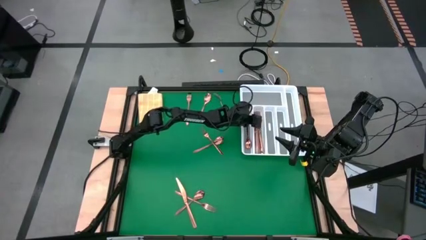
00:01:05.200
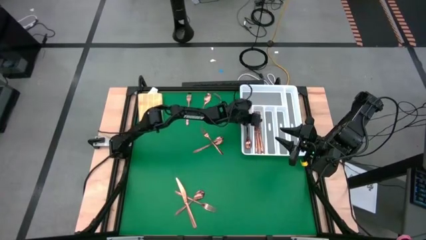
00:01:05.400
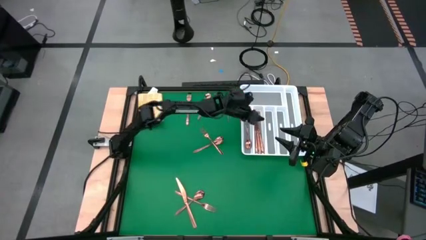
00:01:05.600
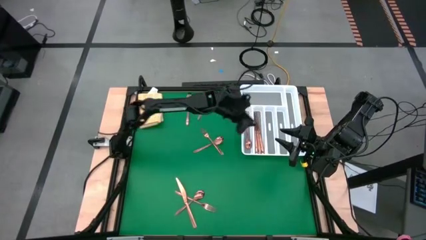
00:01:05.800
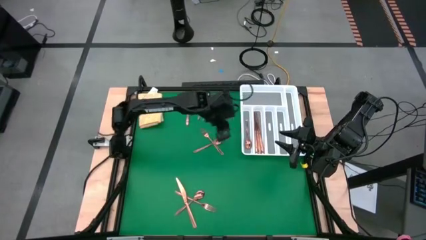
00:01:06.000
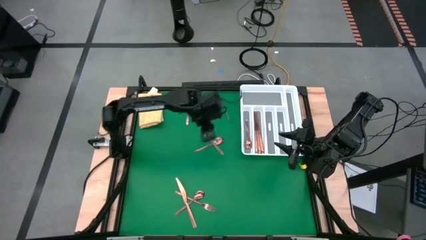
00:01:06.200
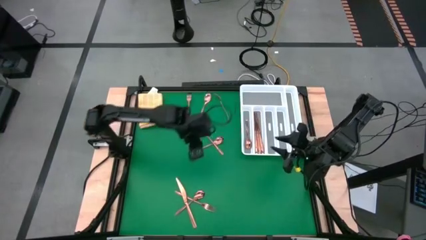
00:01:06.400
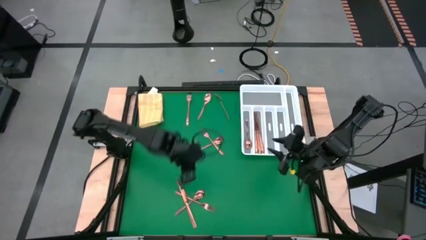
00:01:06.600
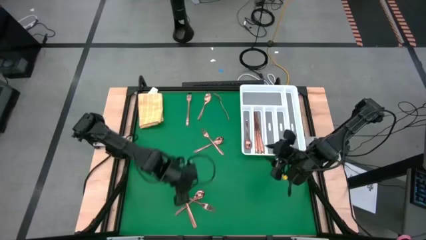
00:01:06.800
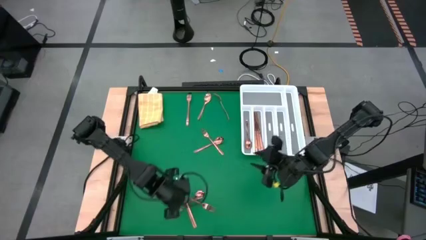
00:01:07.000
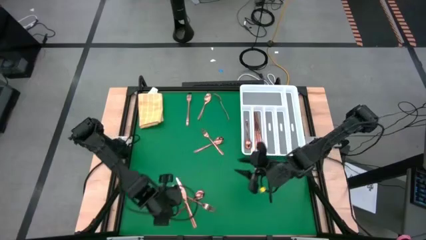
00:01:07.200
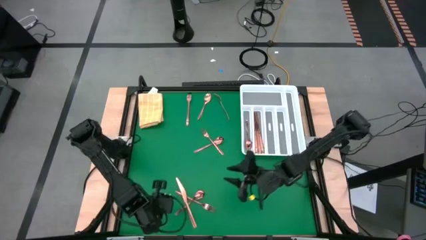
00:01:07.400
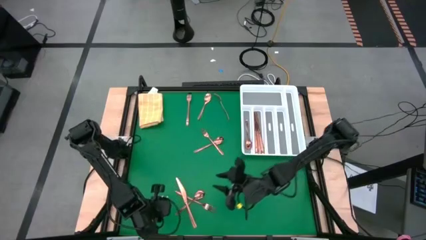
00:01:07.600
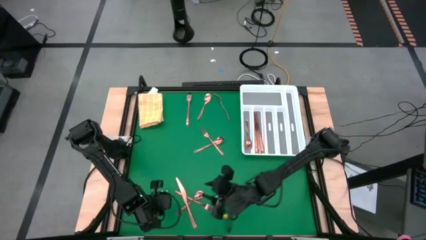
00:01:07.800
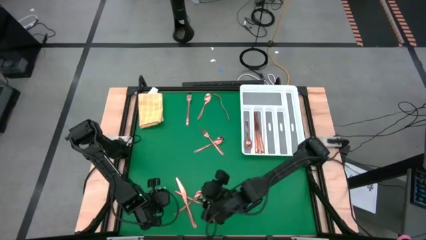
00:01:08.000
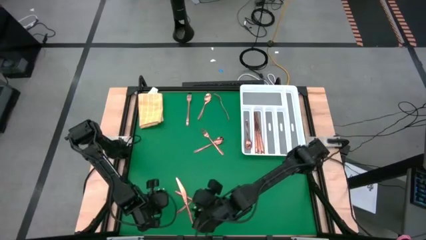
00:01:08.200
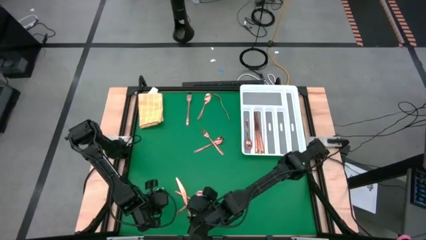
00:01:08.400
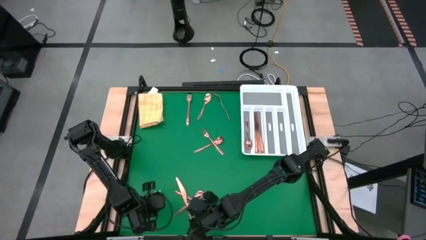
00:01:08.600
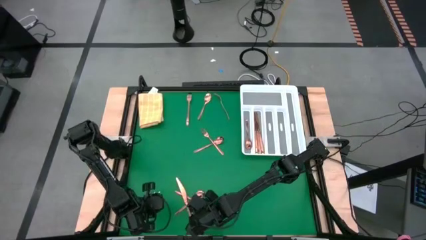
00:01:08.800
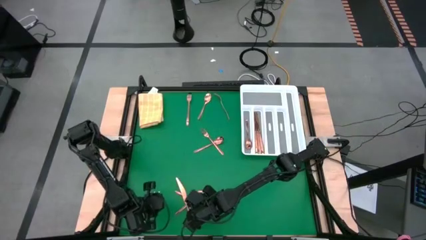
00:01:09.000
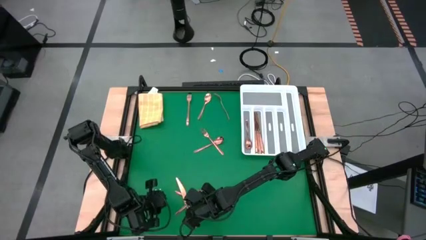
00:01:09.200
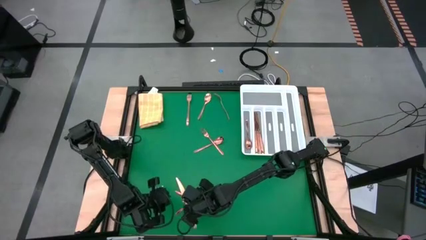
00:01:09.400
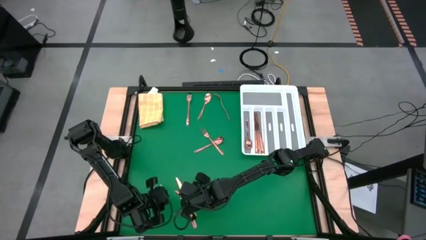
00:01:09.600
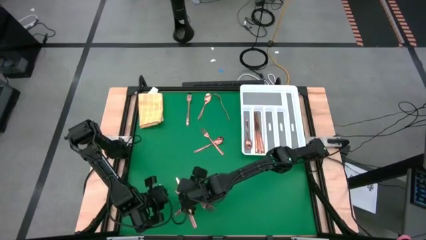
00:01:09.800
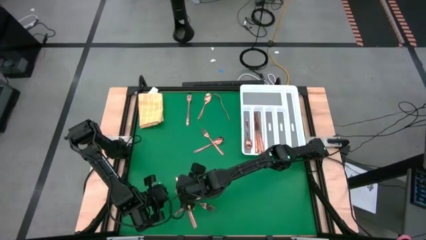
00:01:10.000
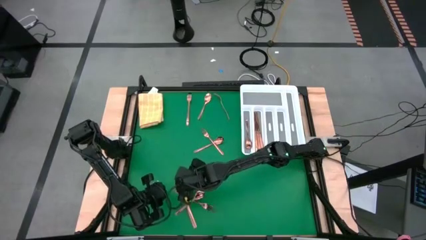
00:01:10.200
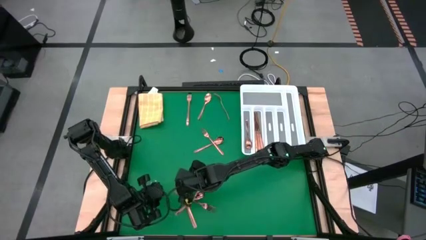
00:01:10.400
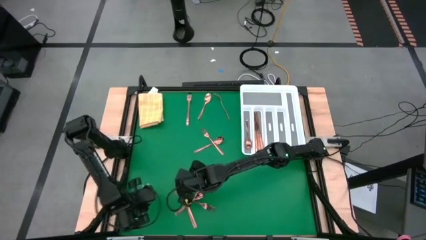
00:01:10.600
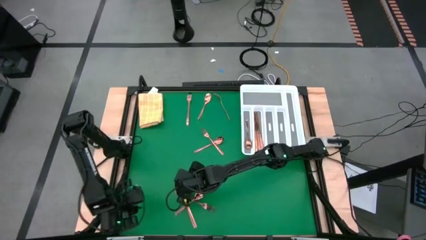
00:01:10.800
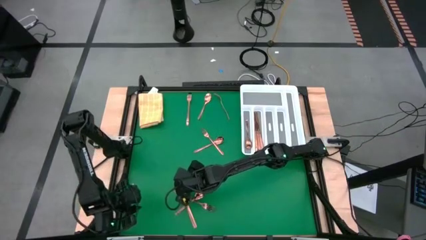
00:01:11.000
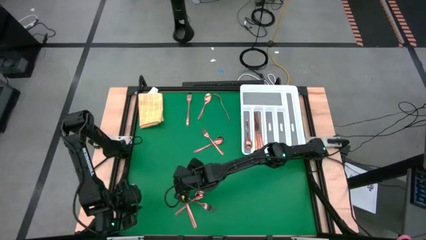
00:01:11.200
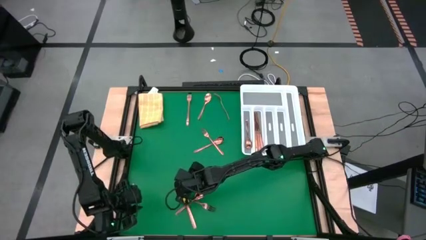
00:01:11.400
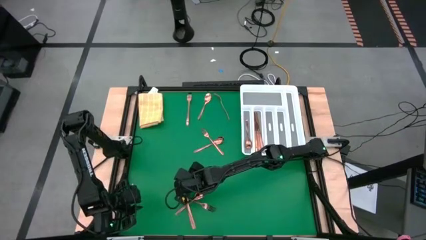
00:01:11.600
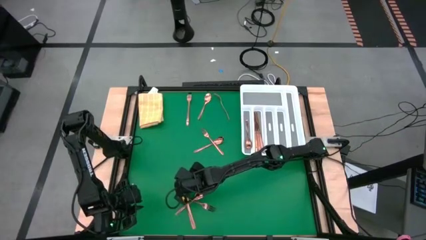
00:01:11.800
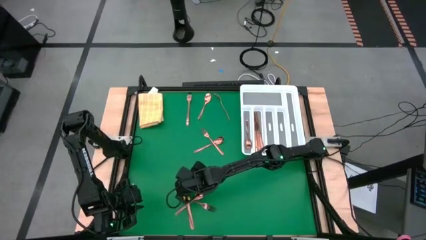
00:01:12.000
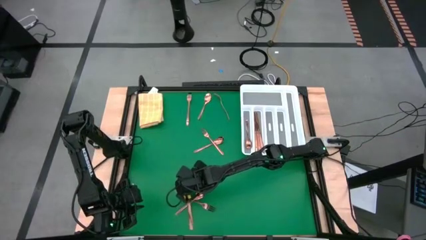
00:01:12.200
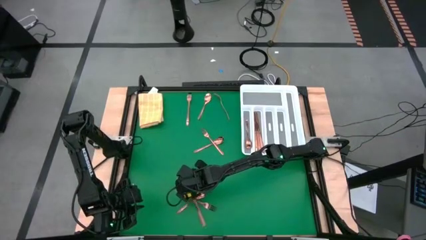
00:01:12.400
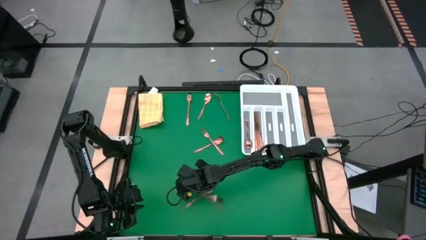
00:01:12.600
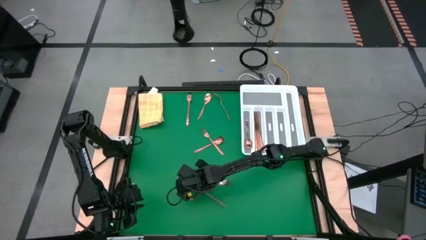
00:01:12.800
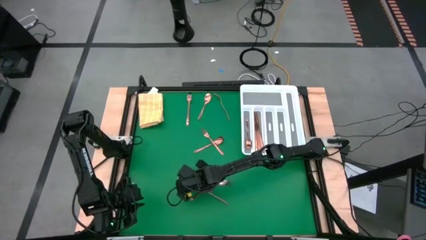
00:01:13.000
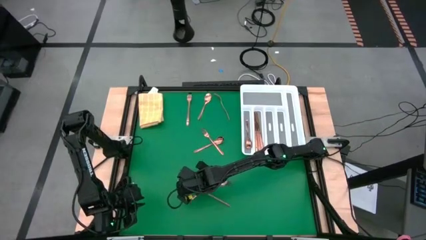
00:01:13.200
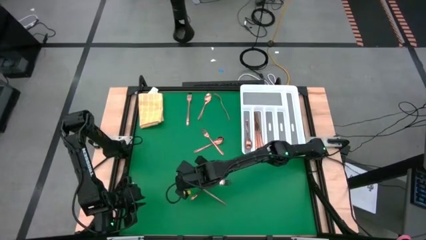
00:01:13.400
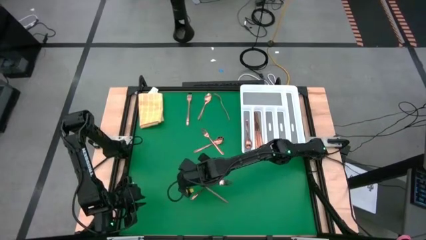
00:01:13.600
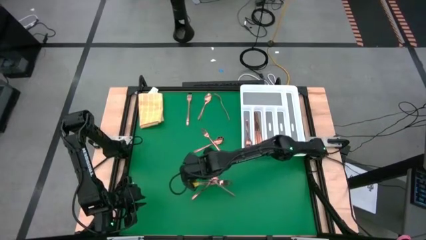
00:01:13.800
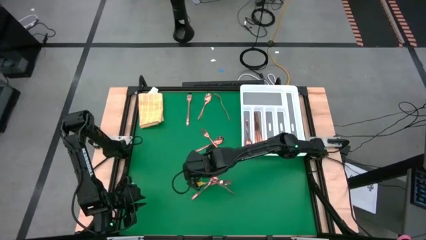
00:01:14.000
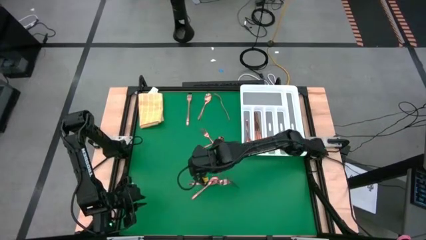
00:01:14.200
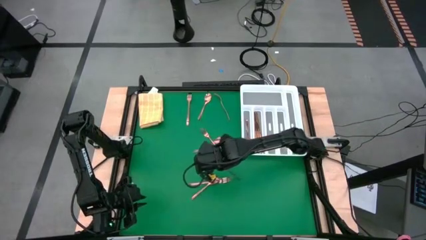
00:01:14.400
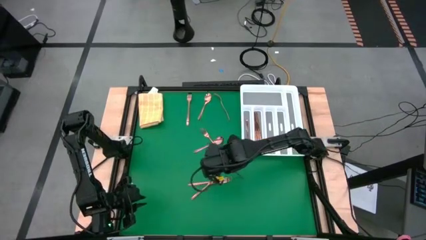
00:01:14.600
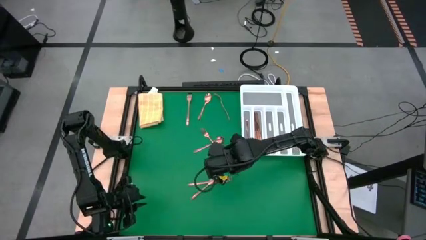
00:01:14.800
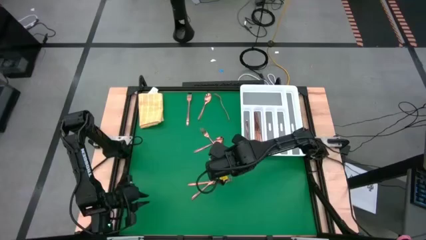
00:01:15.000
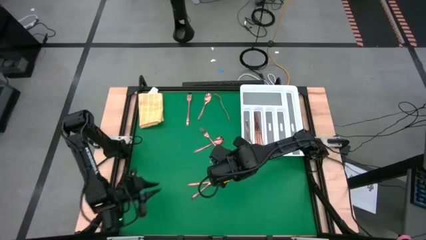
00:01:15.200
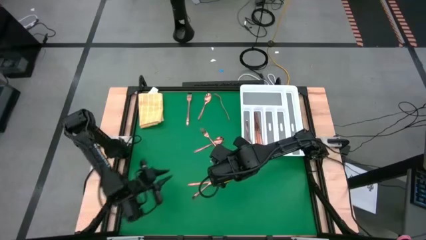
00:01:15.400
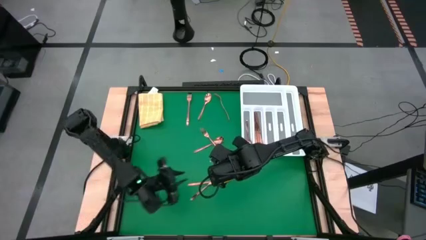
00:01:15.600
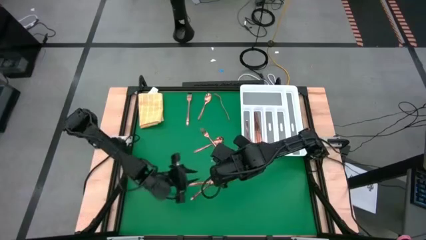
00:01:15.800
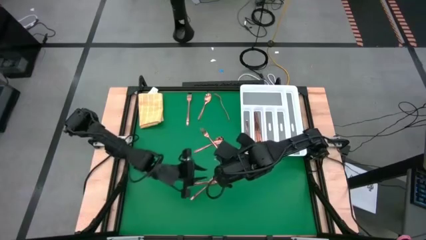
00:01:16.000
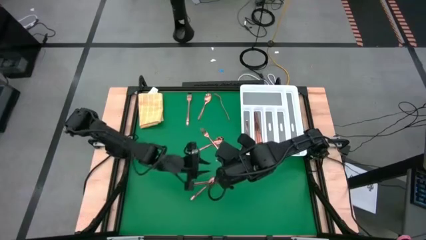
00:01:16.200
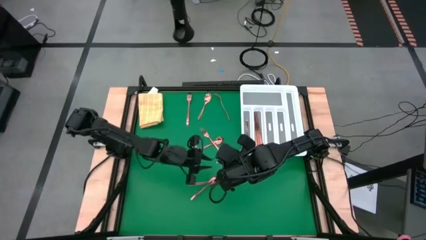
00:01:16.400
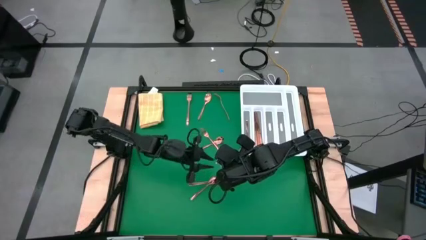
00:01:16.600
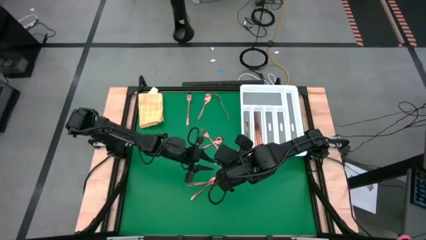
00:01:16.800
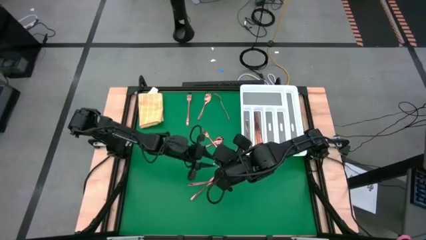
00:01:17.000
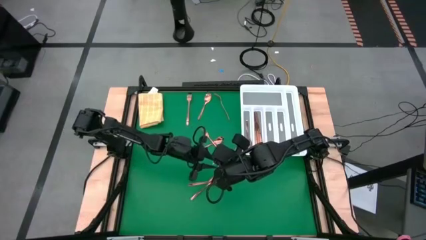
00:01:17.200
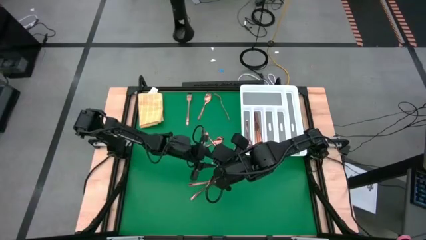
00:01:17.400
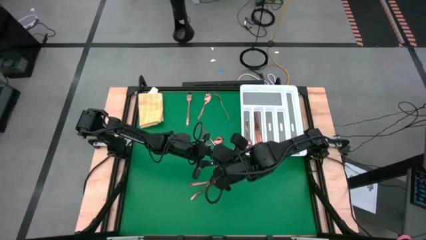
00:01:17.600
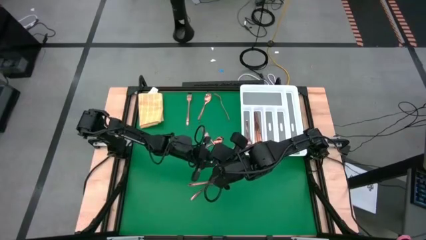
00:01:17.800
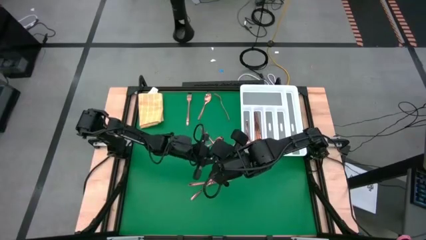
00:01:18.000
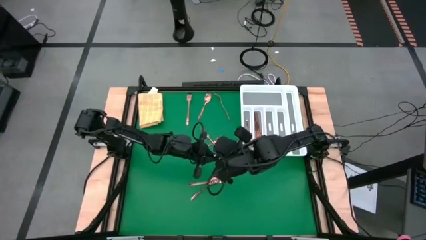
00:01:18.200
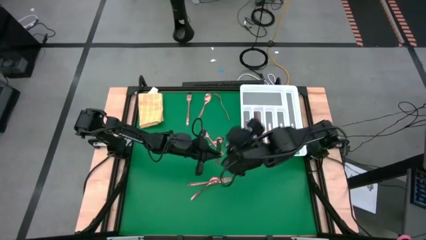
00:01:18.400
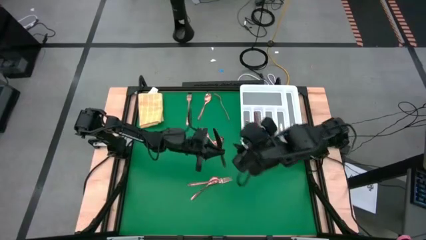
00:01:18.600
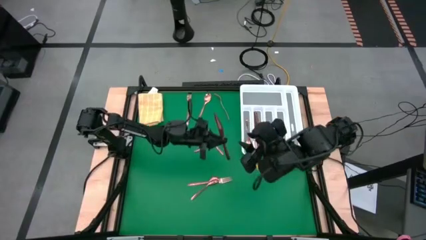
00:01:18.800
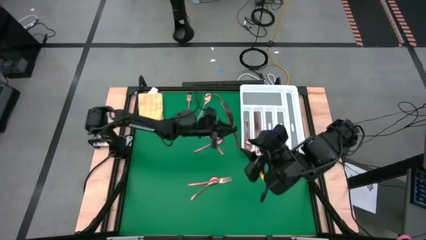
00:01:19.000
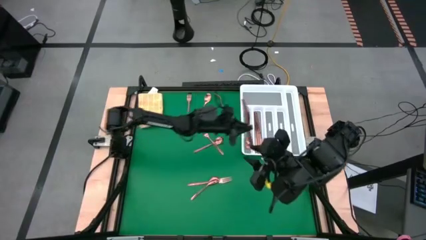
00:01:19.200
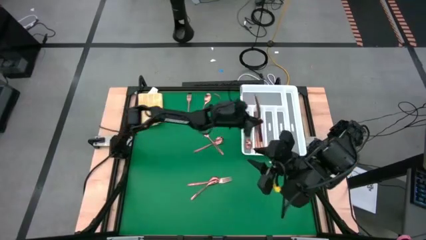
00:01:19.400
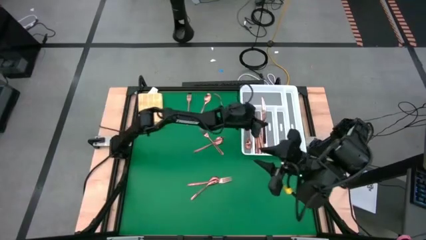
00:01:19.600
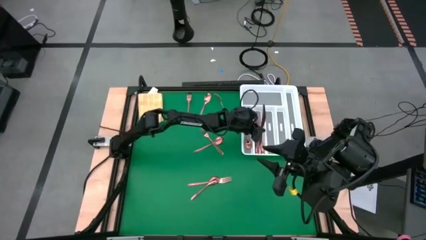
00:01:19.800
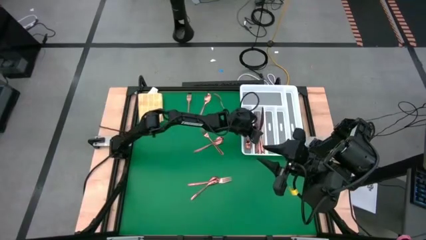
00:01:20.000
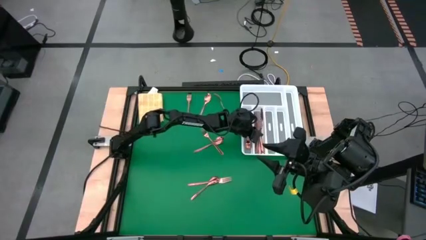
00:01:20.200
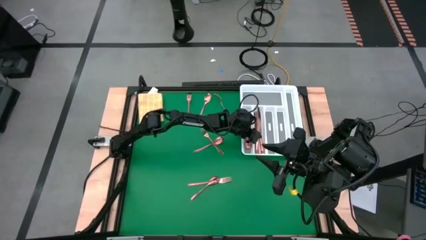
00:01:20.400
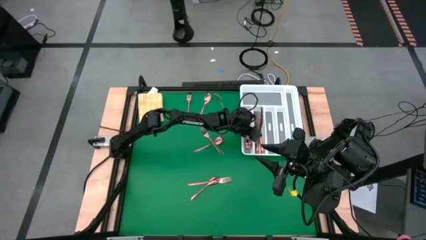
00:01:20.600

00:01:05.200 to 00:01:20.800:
Task: Sort silverware
Put the gold table knife into the silverware organizer

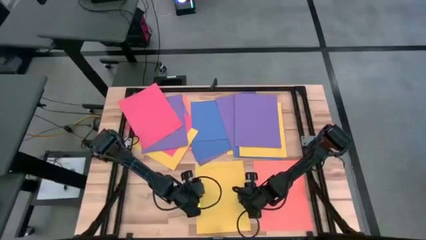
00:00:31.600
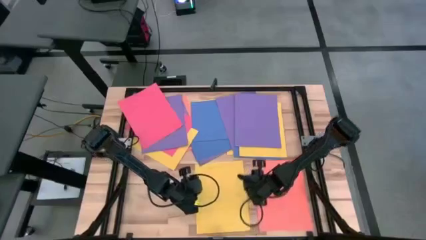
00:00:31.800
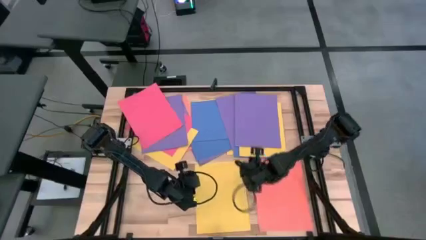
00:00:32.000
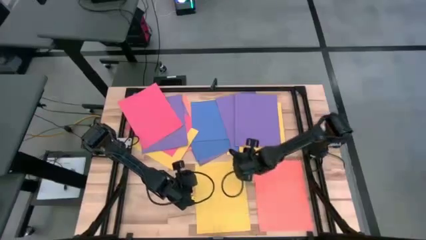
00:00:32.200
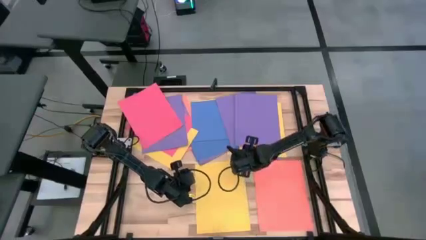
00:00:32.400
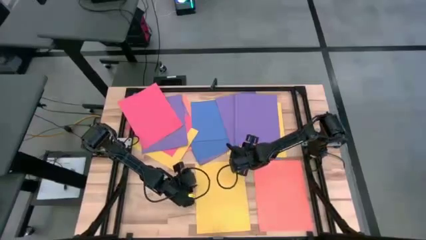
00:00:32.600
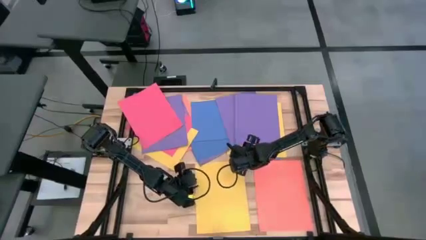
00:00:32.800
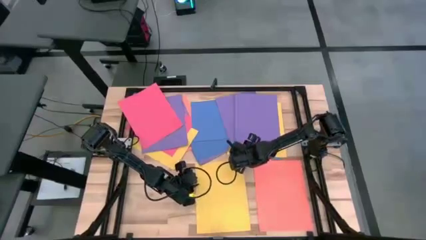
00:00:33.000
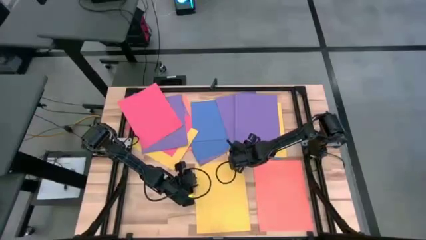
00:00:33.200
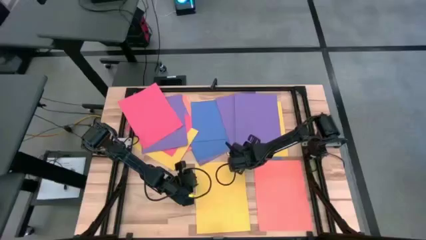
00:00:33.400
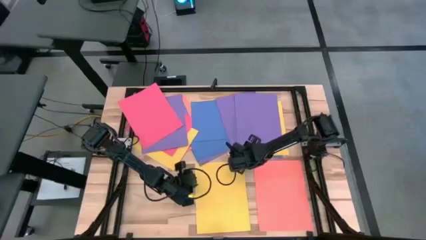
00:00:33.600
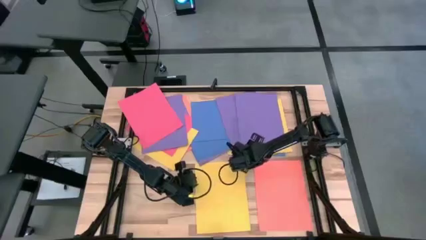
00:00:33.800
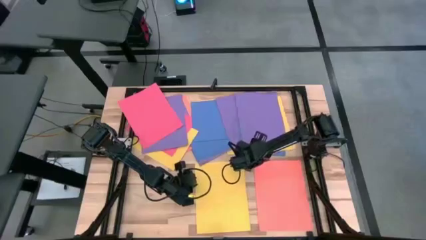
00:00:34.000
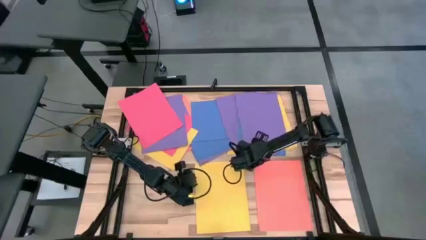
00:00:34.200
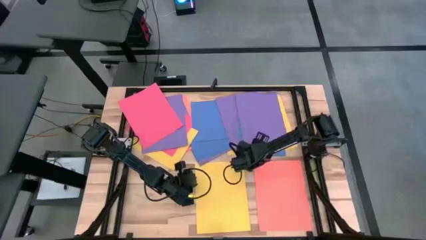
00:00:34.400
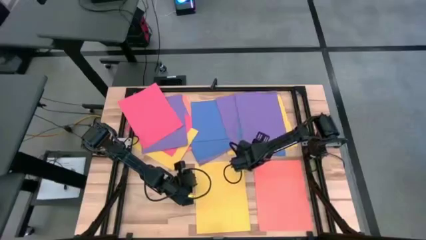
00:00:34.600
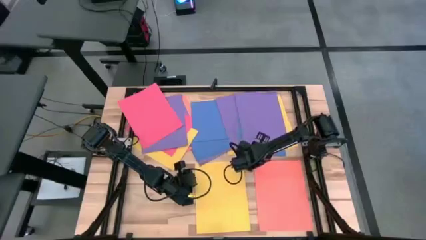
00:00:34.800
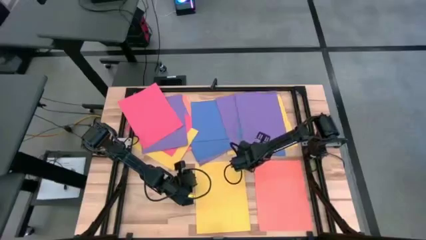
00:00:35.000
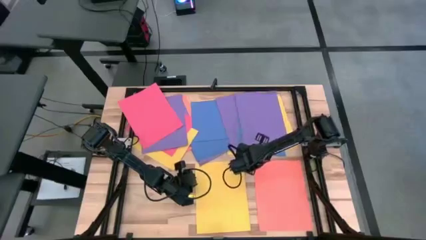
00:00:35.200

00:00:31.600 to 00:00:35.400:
Task: Organize paper
Stack the yellow paper on top of the yellow paper
